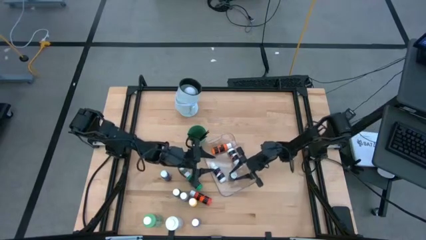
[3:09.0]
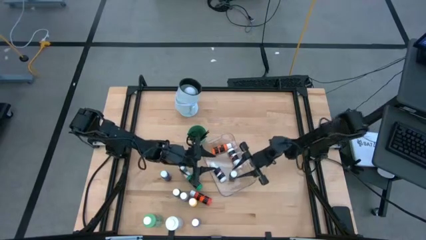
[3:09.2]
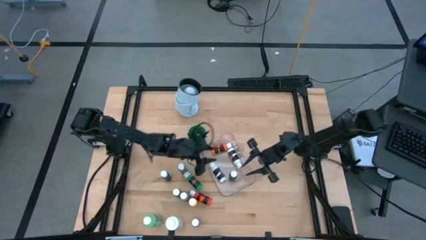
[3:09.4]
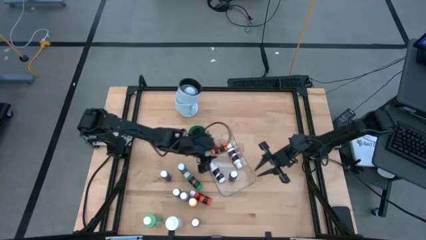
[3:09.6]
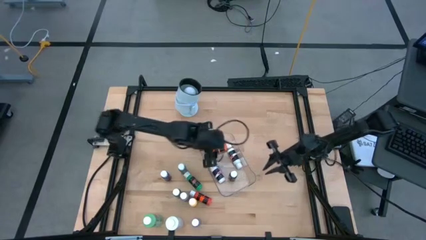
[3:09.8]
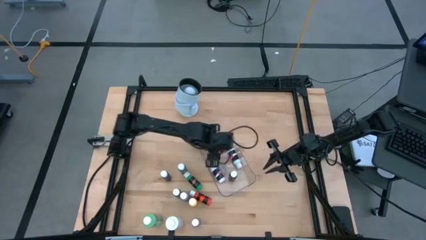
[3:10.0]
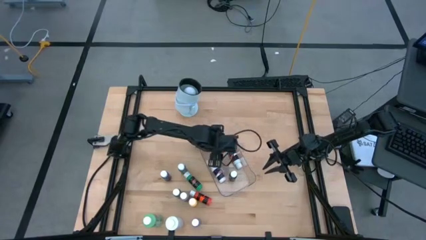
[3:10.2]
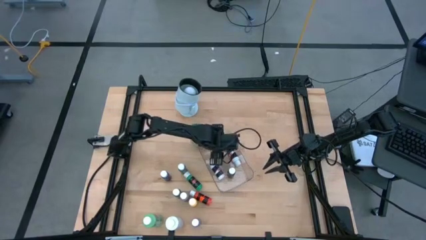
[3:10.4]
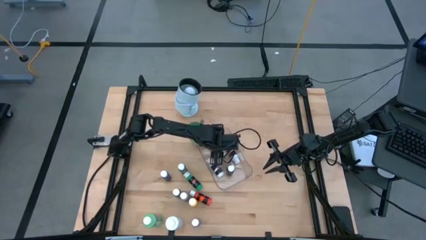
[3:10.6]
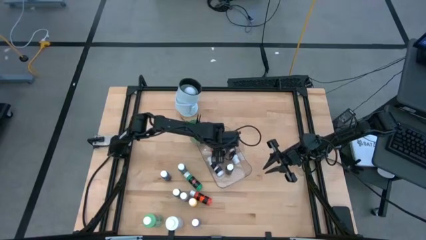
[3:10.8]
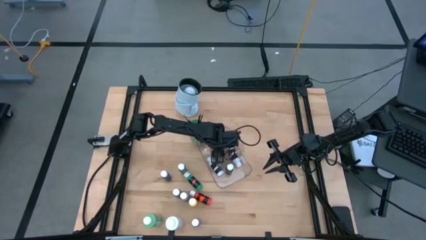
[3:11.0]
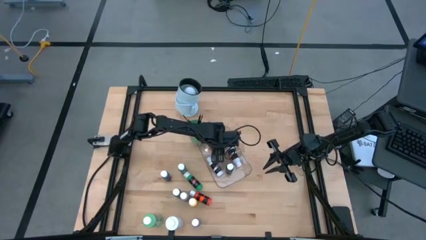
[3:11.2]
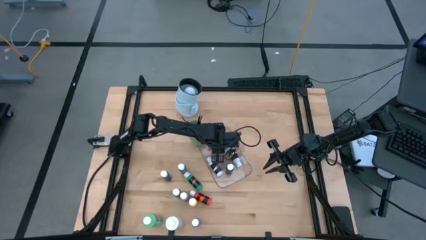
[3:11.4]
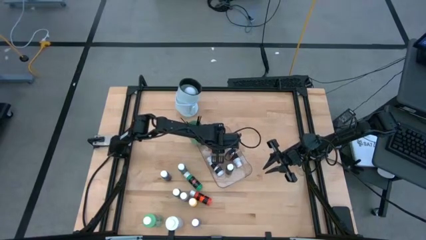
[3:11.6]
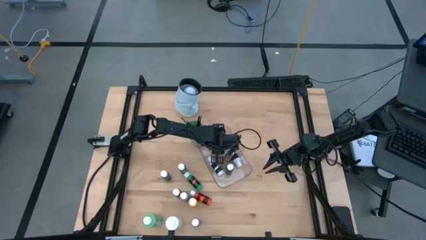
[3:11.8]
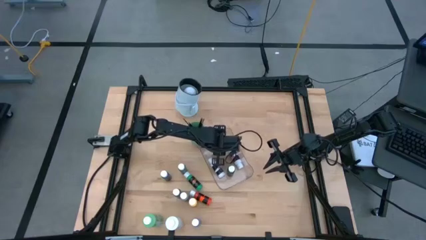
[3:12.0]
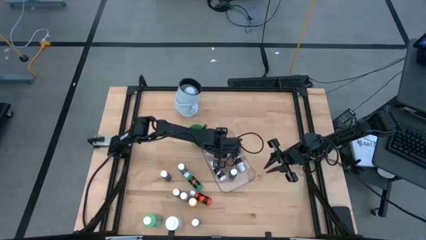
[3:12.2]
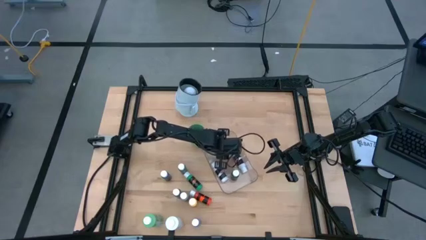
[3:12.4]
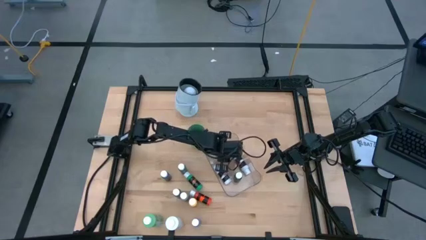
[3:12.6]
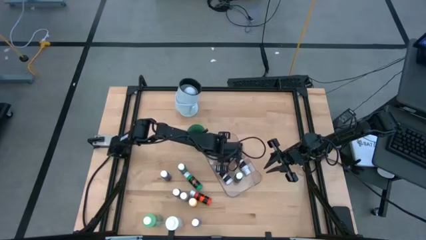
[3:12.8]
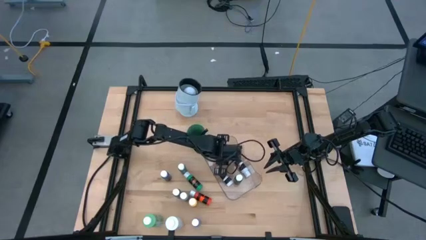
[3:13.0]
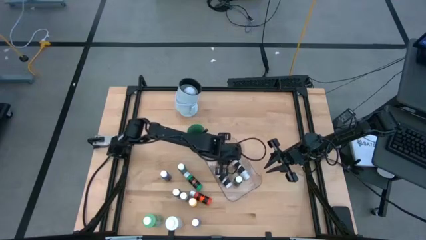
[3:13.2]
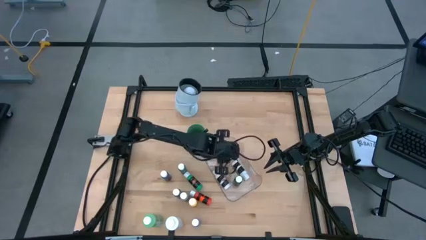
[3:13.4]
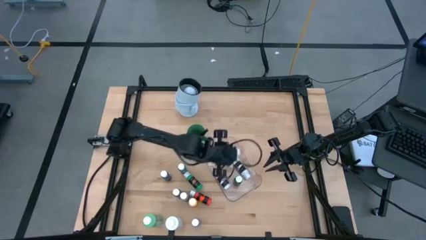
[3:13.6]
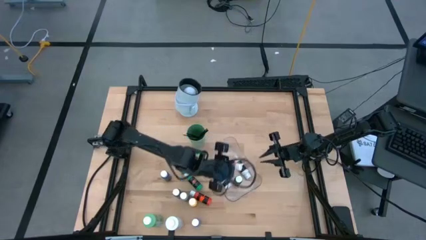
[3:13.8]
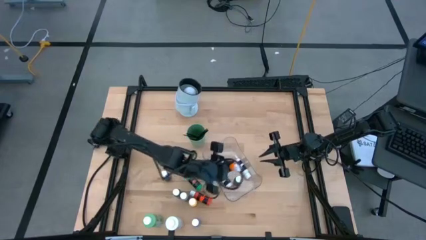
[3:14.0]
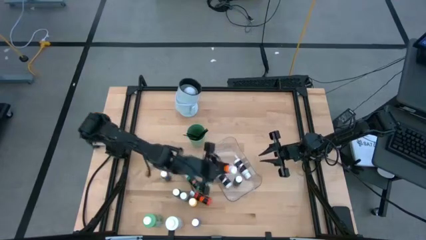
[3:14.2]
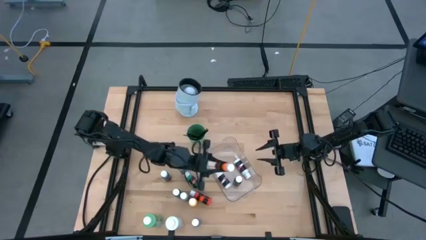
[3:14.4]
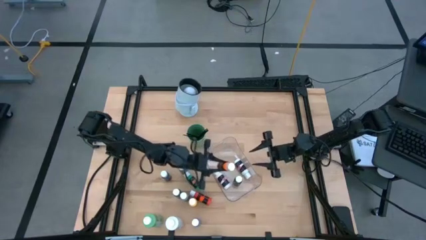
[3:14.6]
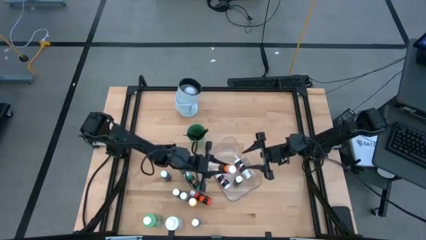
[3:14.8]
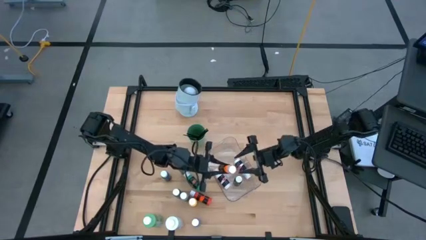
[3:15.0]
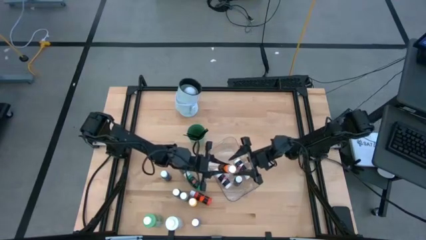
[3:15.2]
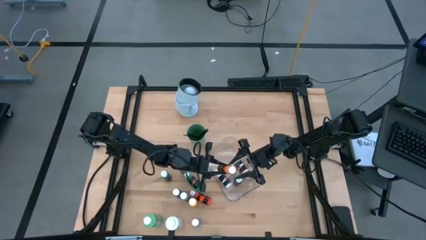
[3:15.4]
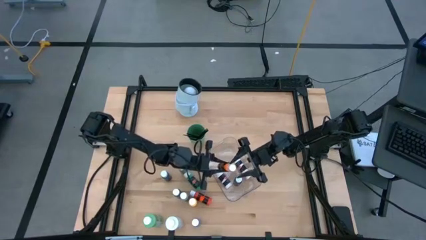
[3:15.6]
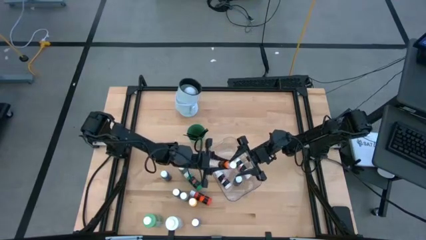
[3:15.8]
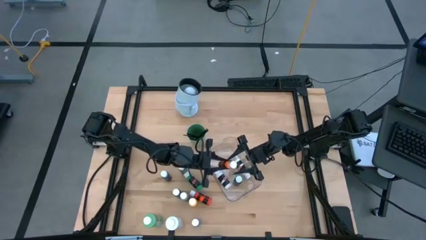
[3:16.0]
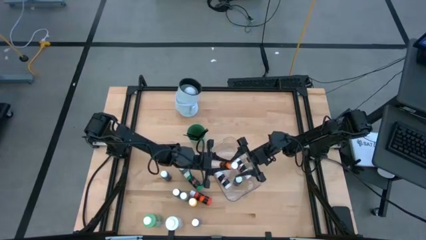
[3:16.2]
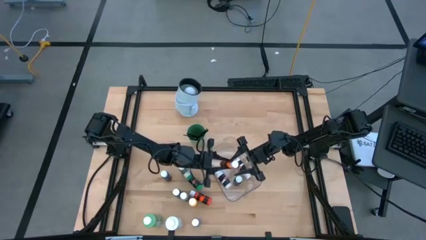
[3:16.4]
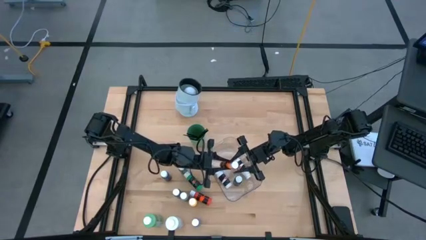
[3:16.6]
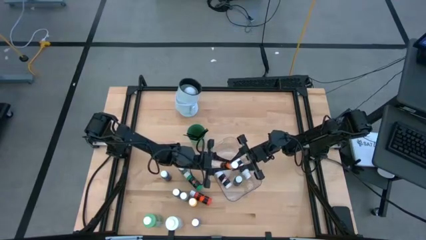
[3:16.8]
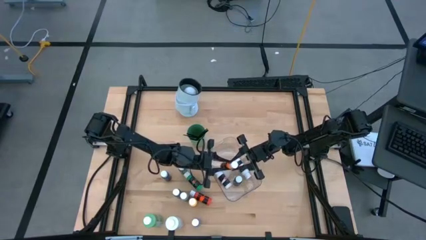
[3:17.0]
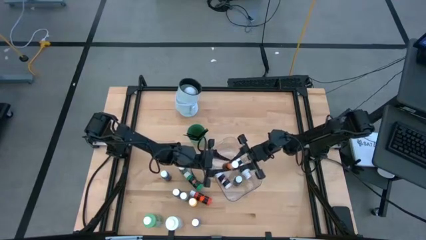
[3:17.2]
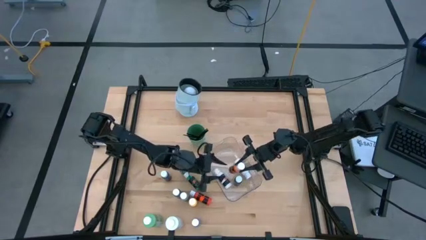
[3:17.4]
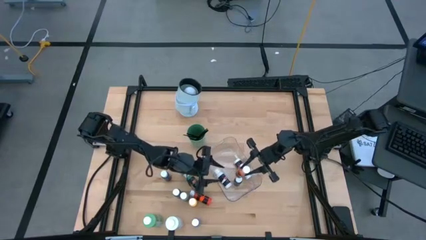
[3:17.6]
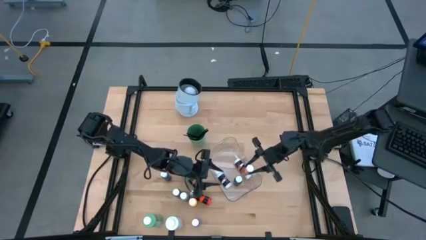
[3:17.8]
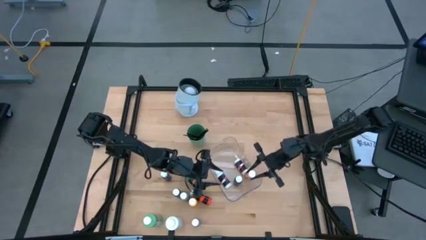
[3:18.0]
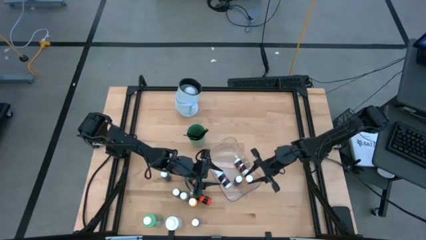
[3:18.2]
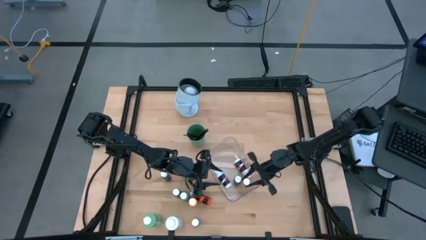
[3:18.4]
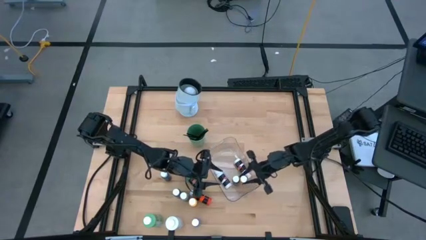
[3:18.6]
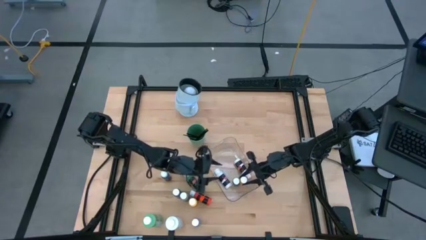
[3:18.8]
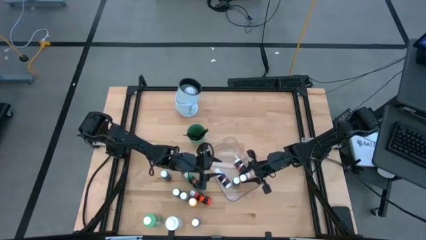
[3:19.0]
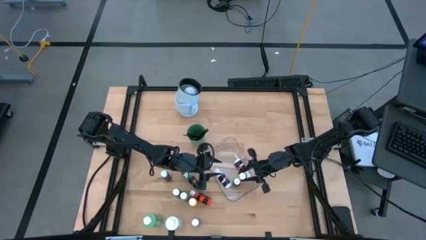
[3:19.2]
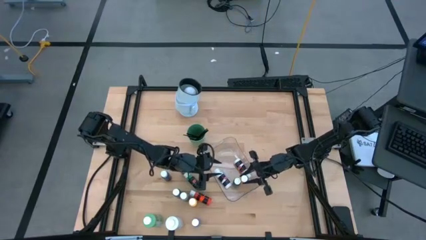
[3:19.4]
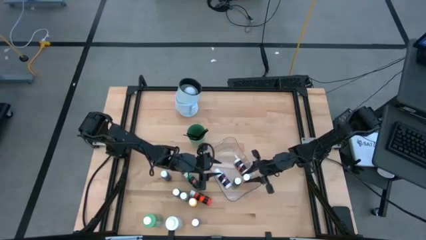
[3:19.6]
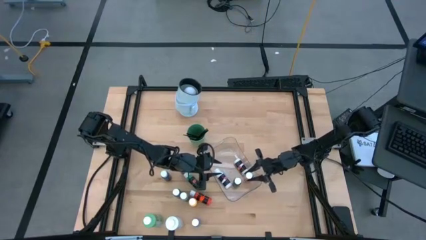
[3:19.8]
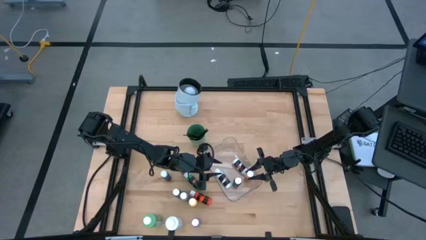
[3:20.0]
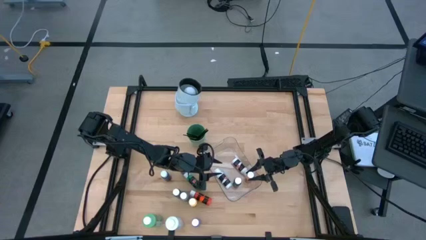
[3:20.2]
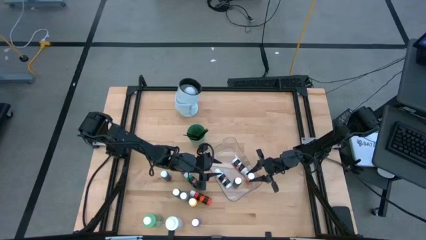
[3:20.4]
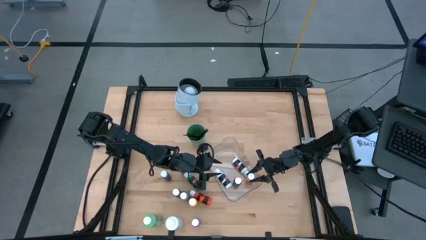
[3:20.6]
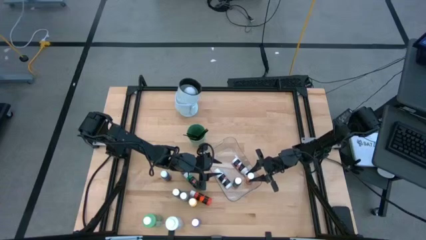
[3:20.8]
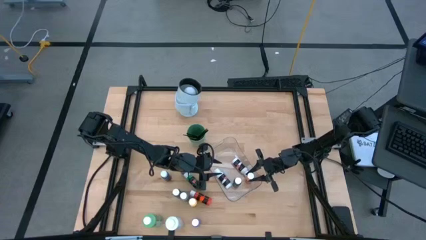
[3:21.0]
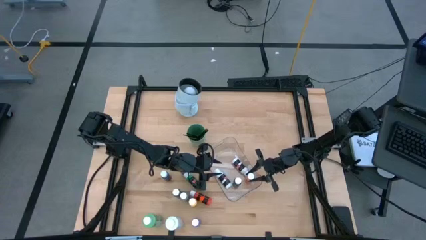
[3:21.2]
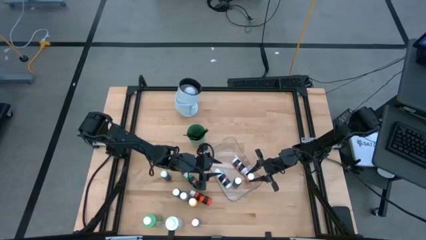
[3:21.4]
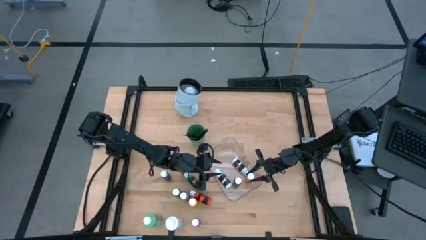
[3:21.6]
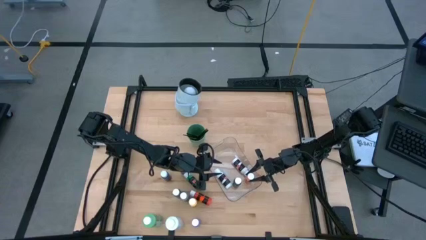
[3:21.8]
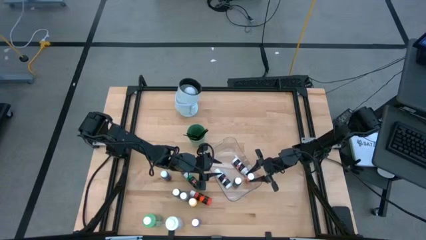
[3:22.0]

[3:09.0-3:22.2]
Task: Pick & Place Paint Supplies
Adjust the small orange paint bottle in the transparent bin

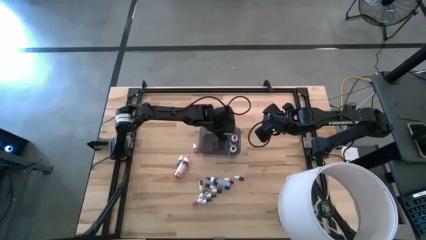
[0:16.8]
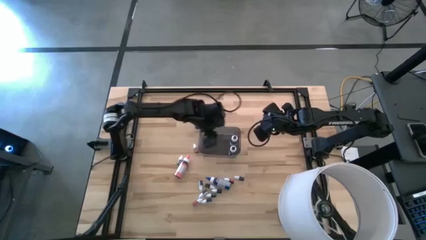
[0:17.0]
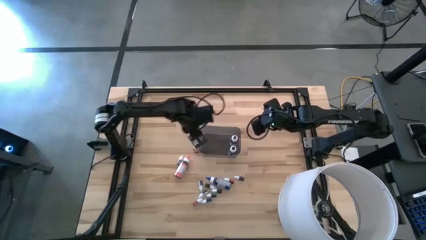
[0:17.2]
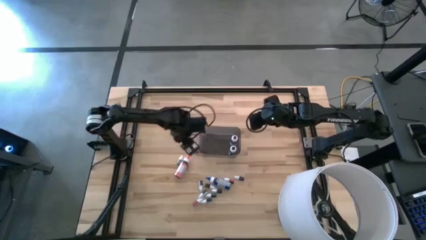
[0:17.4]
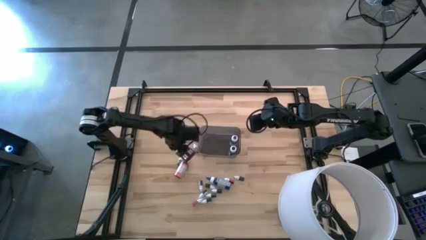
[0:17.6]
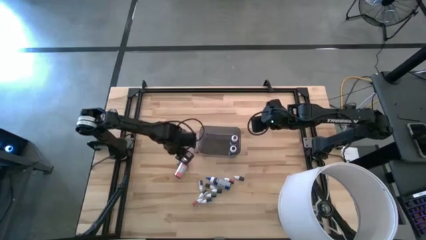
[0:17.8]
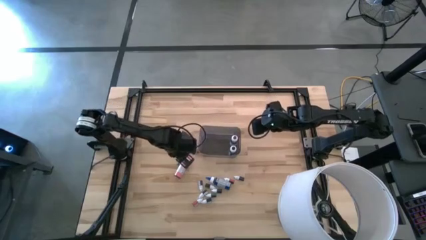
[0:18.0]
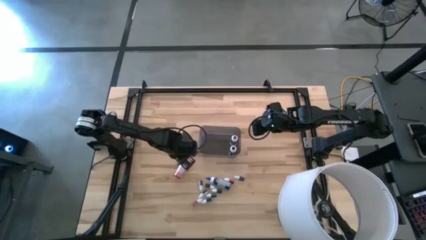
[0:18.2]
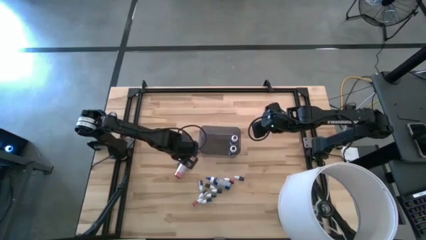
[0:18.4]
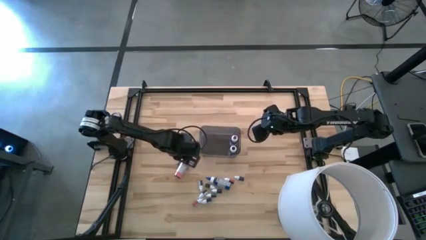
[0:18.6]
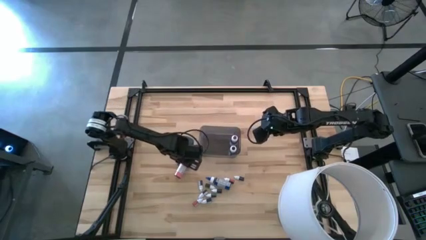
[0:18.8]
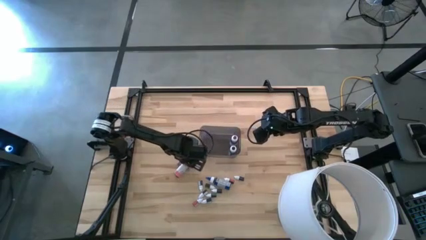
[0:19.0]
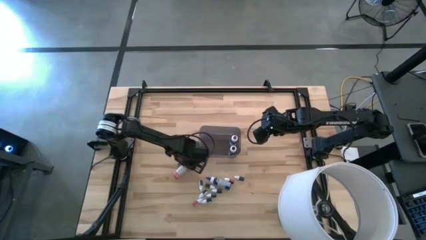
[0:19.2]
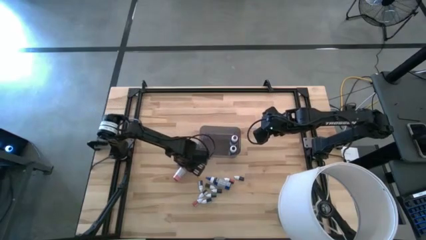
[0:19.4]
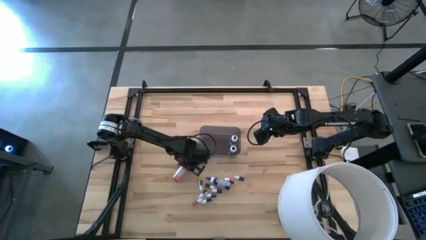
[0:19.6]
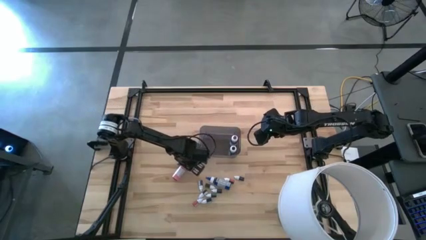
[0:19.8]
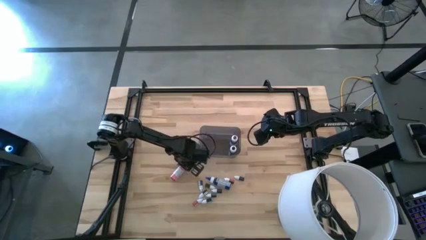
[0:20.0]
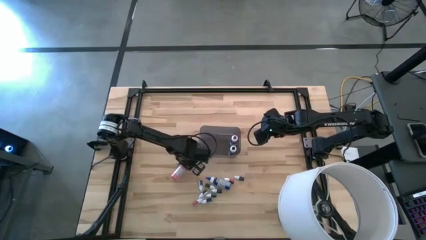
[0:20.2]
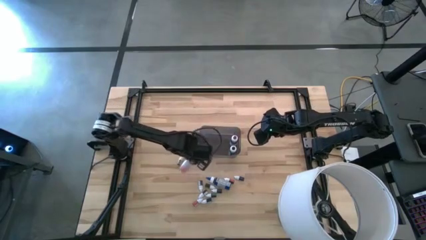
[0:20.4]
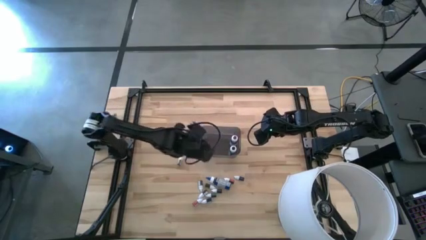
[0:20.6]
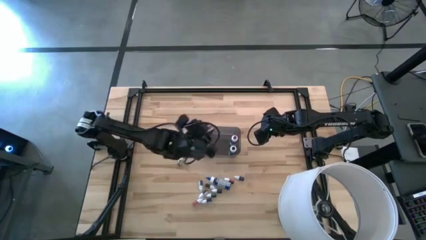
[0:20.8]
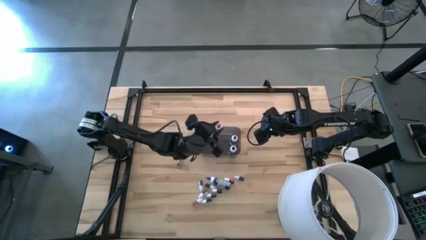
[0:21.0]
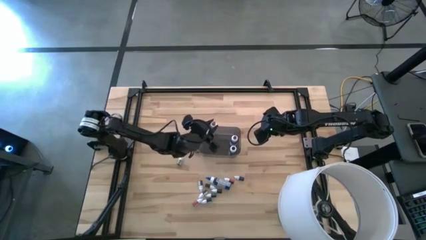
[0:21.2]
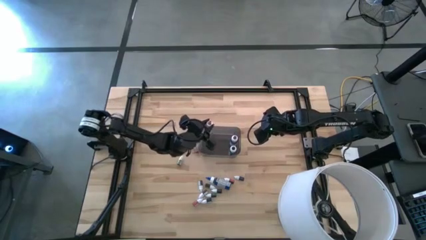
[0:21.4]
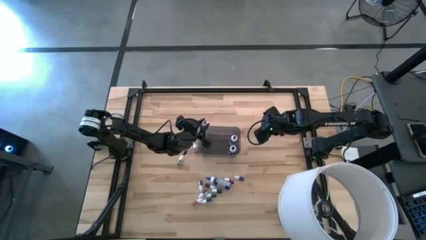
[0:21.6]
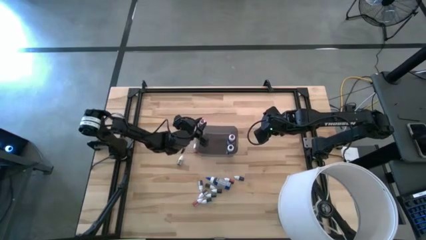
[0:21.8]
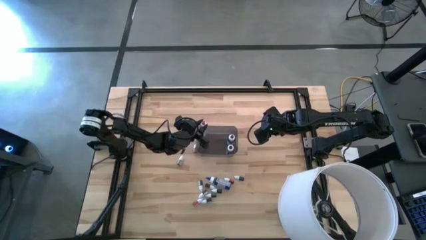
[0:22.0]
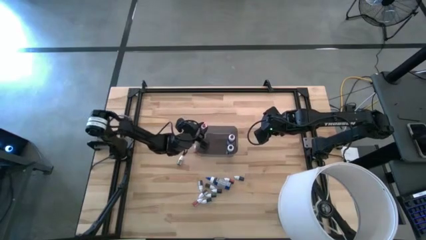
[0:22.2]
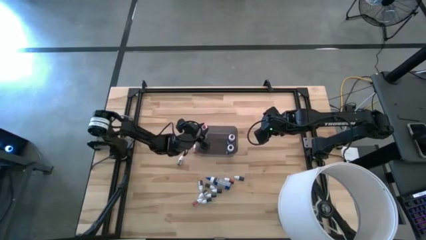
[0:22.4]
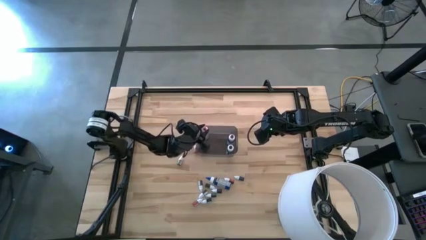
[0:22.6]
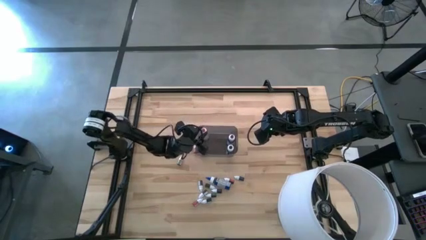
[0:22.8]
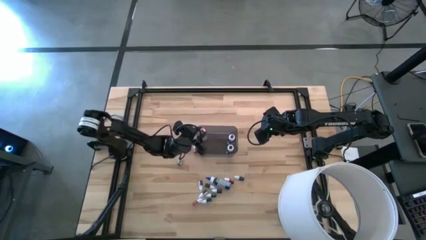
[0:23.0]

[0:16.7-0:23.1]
Task: Pick & Place food coloring
Put the large pink food coloring bottle in the black bin
